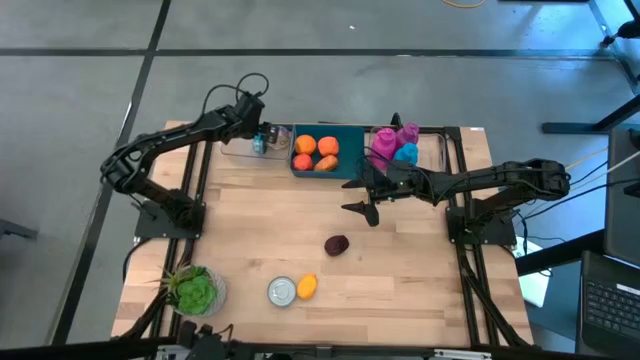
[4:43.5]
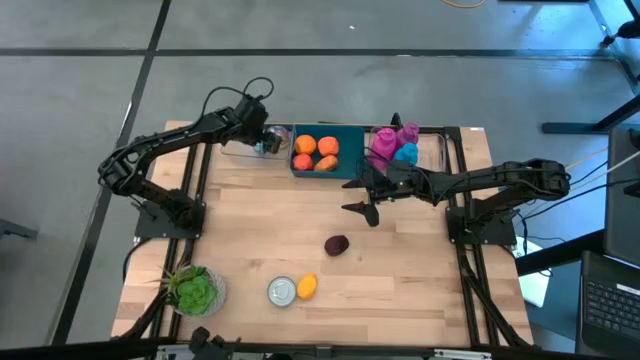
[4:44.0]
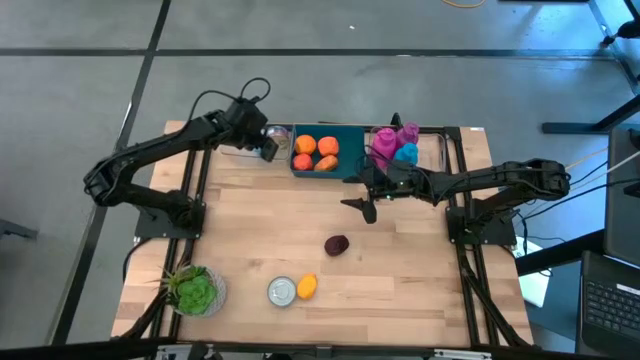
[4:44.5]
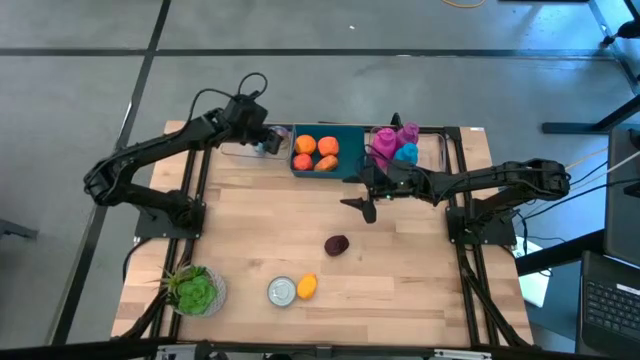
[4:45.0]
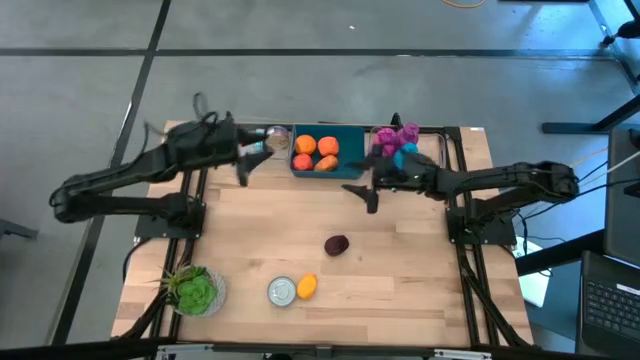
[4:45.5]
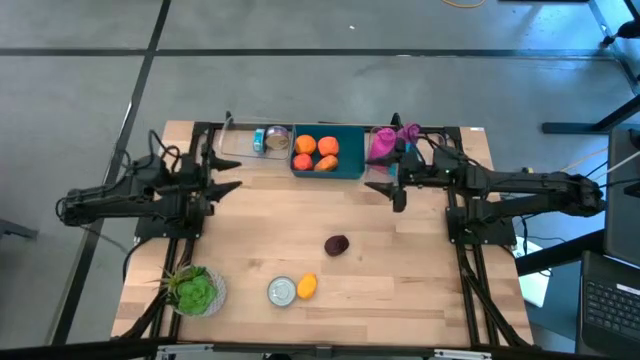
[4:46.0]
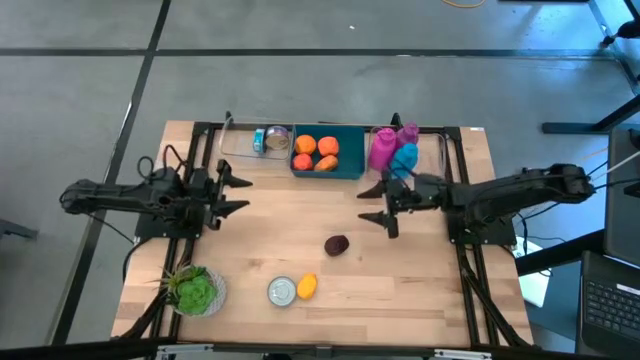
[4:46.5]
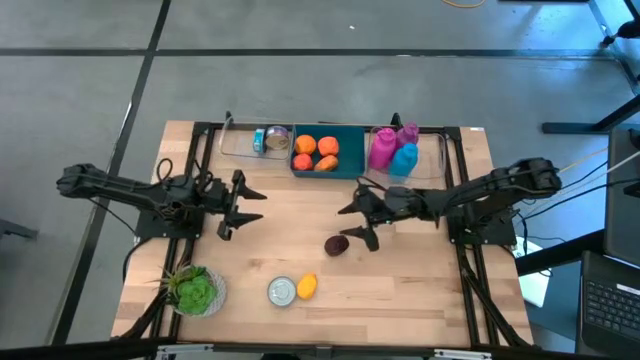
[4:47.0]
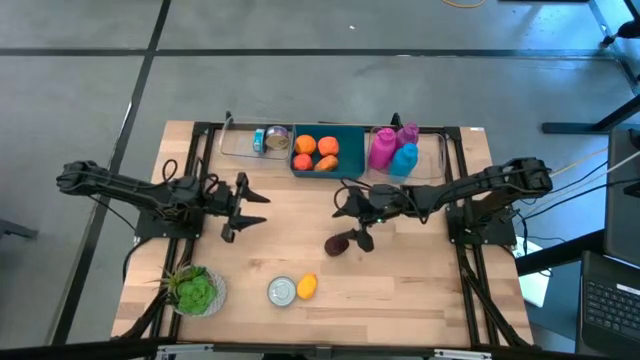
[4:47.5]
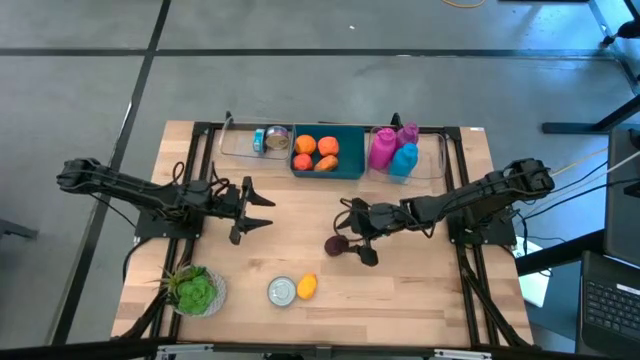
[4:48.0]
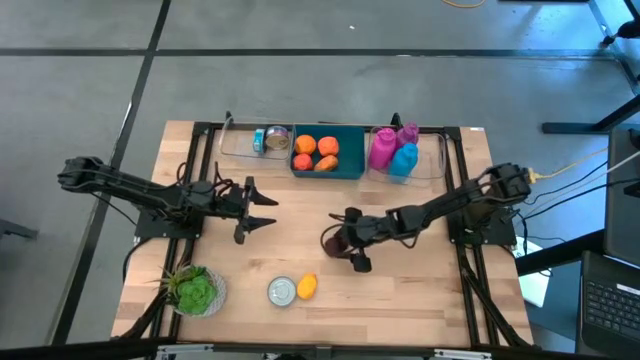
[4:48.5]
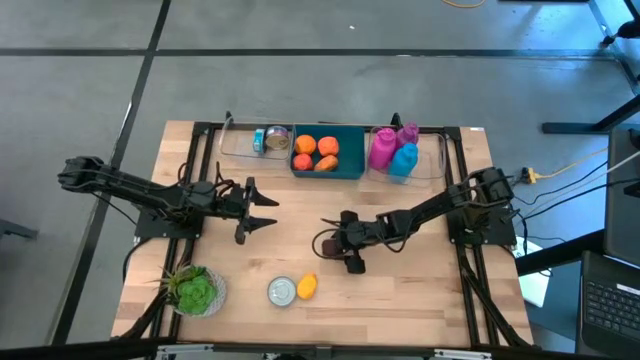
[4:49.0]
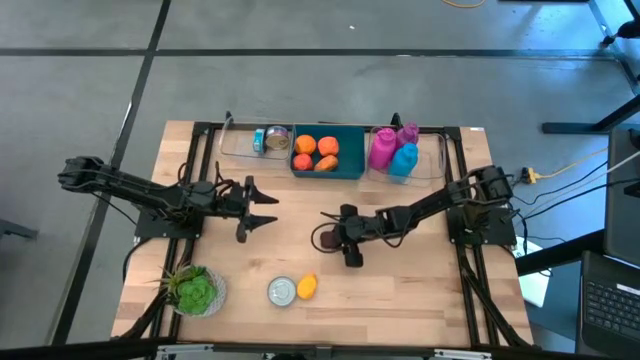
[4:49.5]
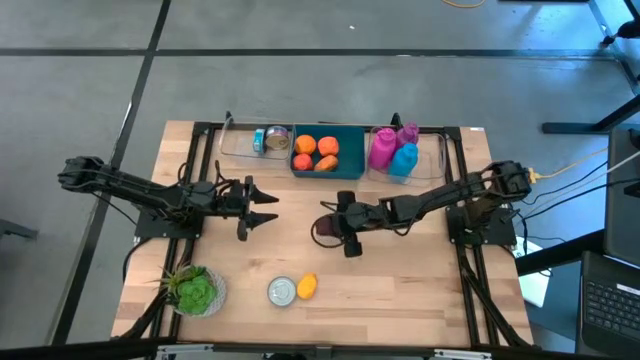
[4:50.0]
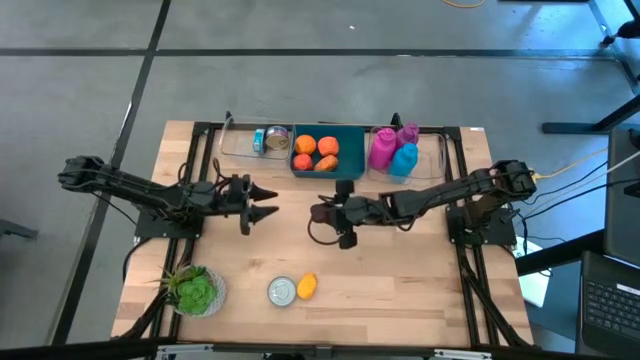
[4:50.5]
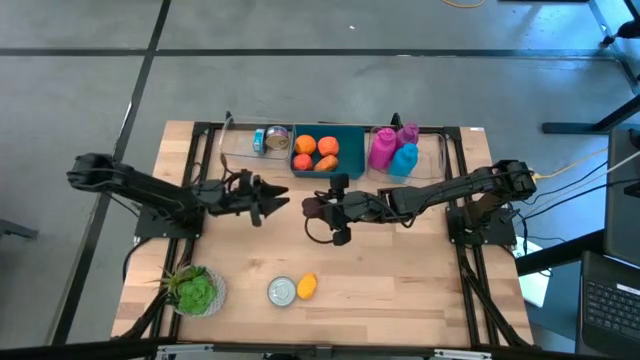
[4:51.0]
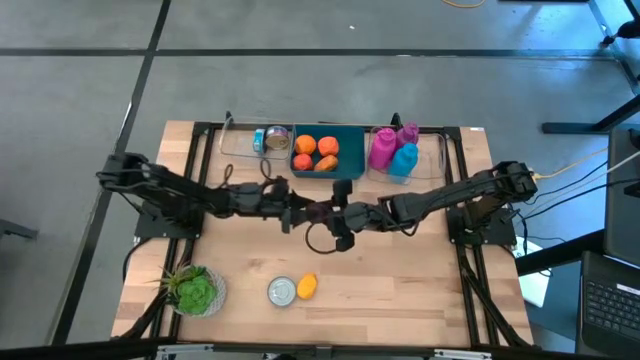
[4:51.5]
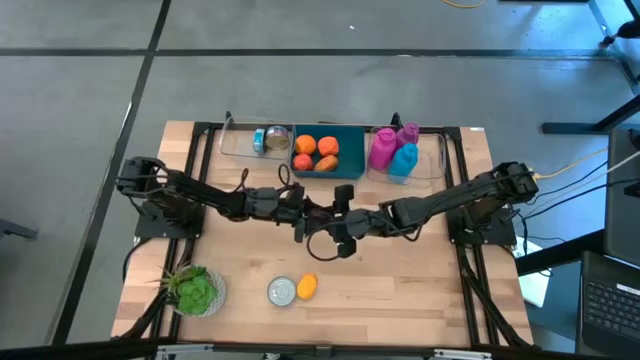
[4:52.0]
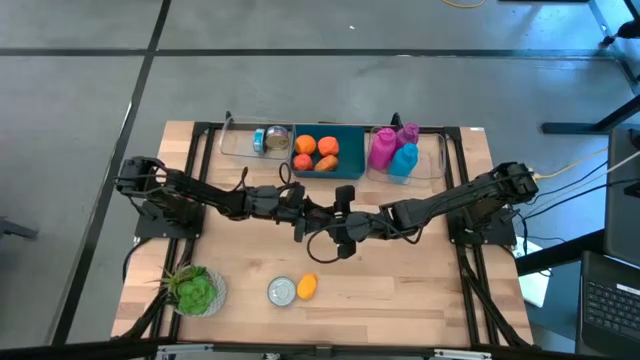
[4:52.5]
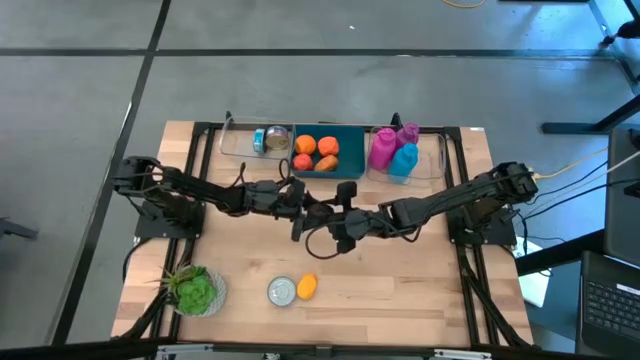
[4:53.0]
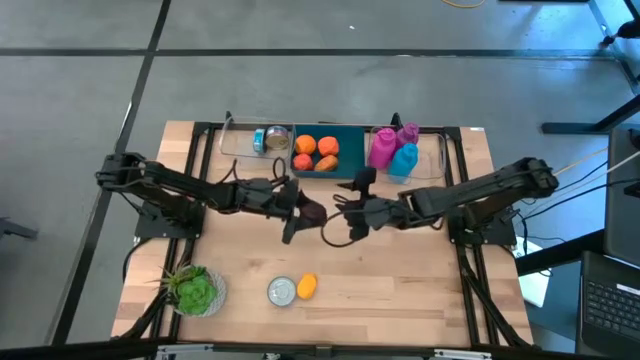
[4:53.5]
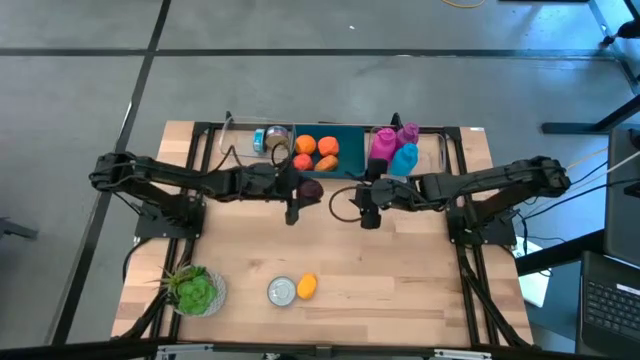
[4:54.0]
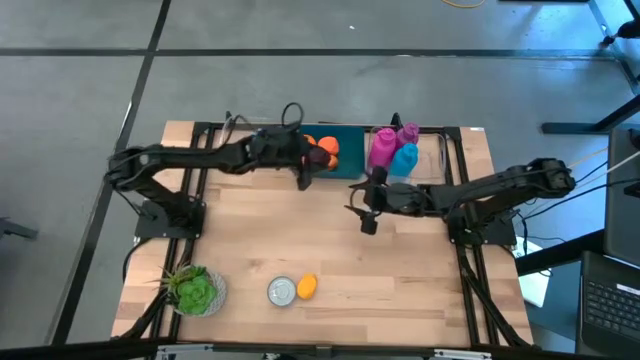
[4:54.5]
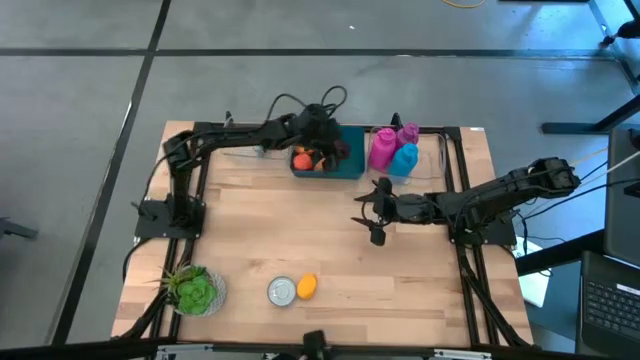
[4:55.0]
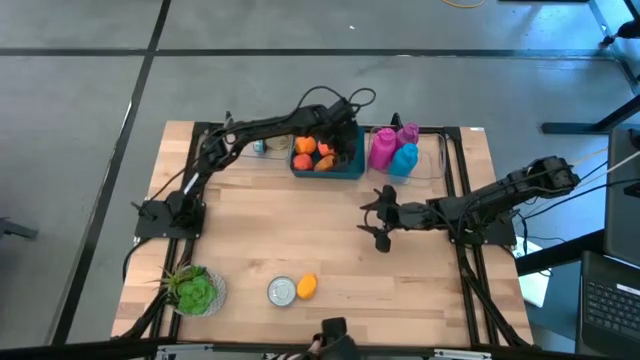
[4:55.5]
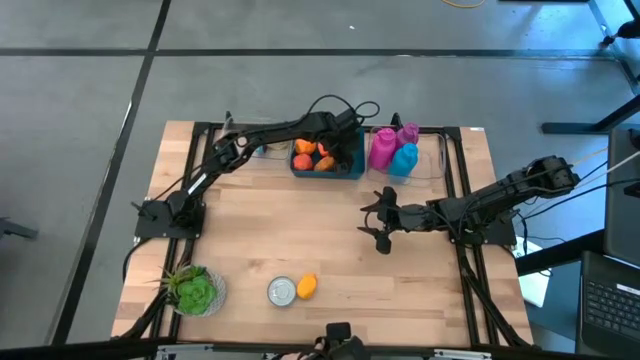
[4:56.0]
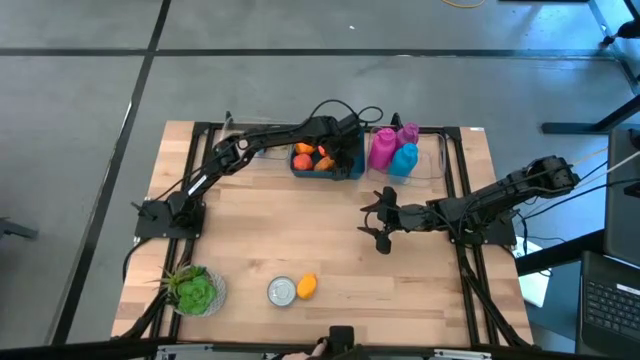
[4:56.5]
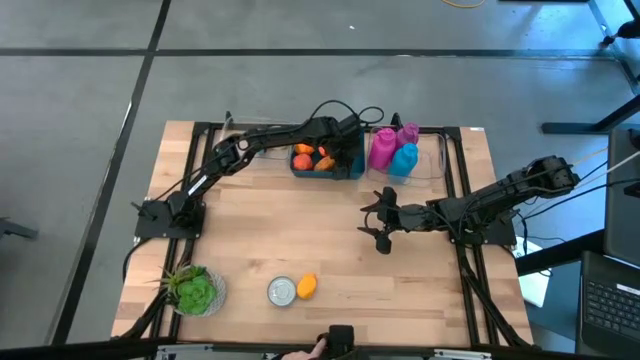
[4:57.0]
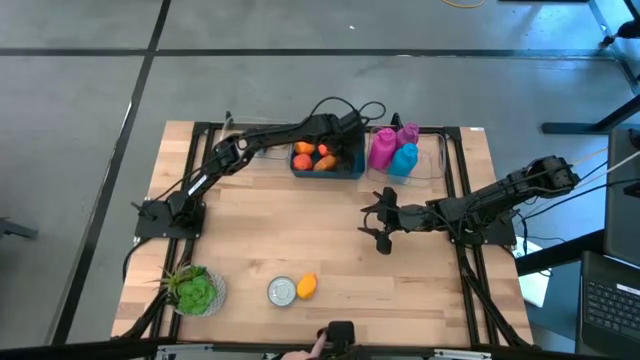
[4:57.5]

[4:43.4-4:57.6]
Task: Pick & Place Food Item
Put the apple into the blue bin

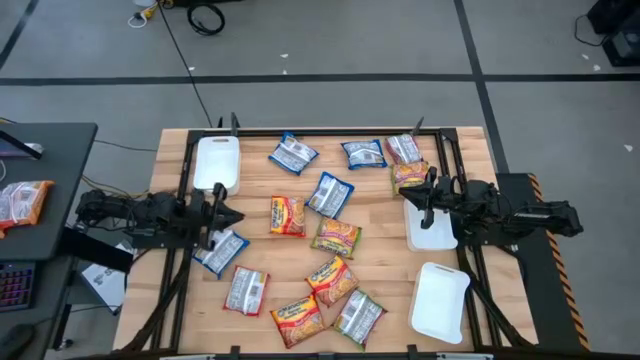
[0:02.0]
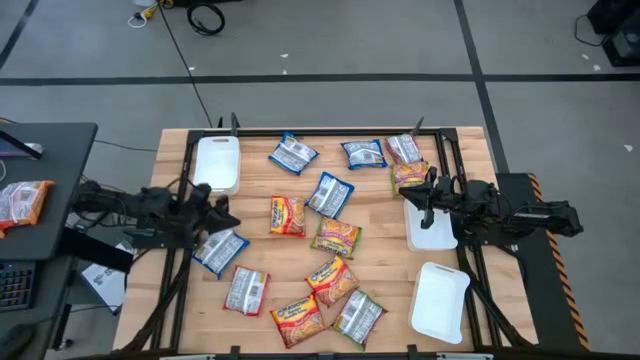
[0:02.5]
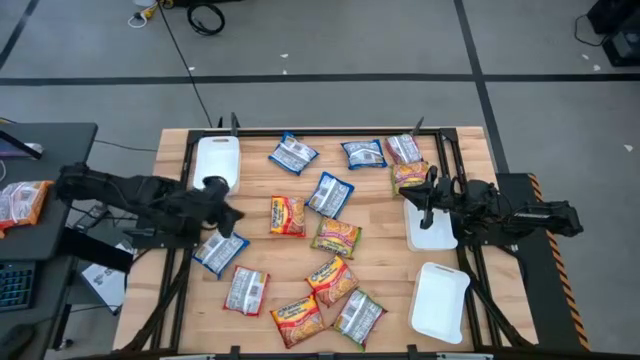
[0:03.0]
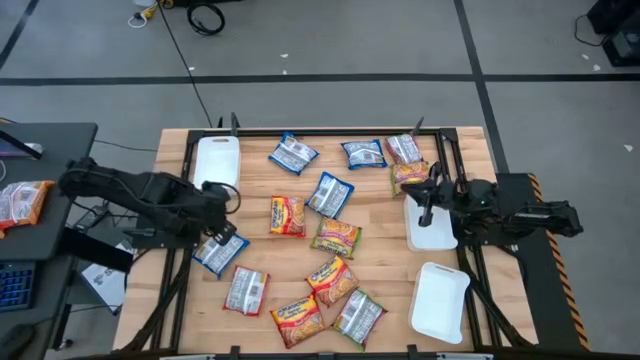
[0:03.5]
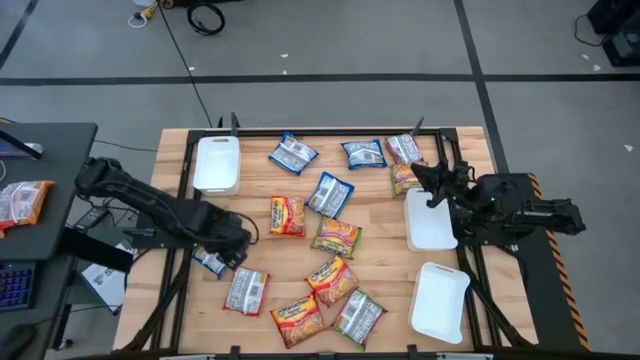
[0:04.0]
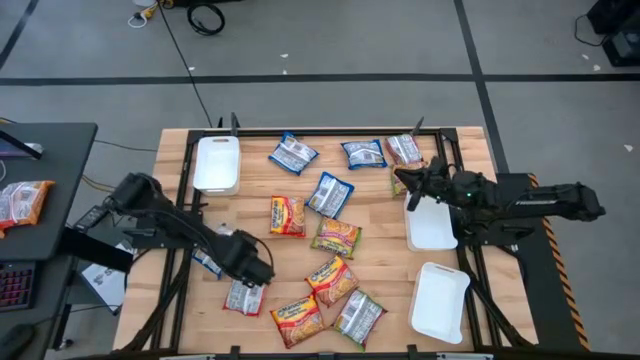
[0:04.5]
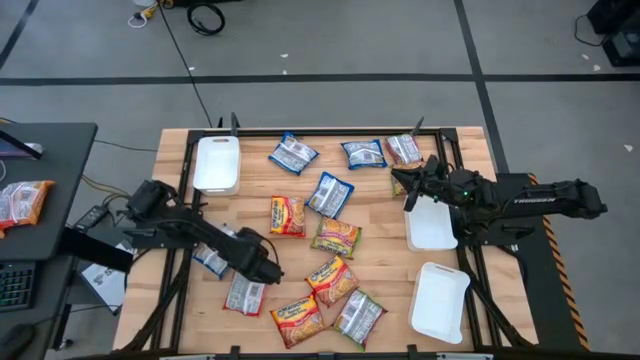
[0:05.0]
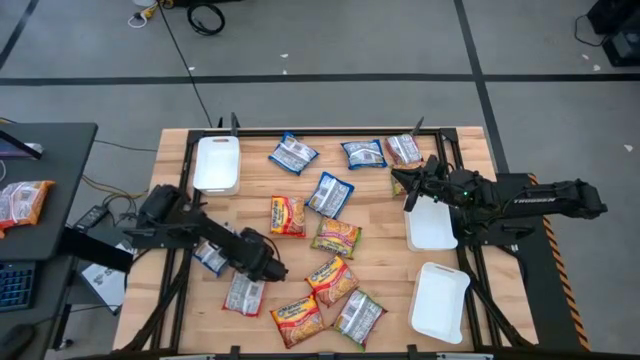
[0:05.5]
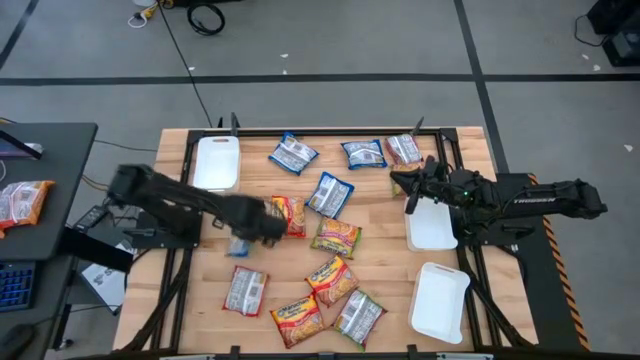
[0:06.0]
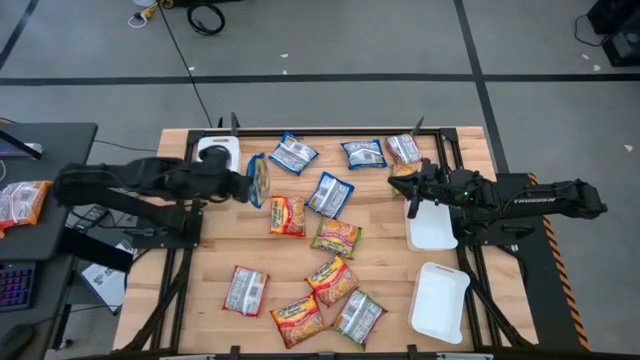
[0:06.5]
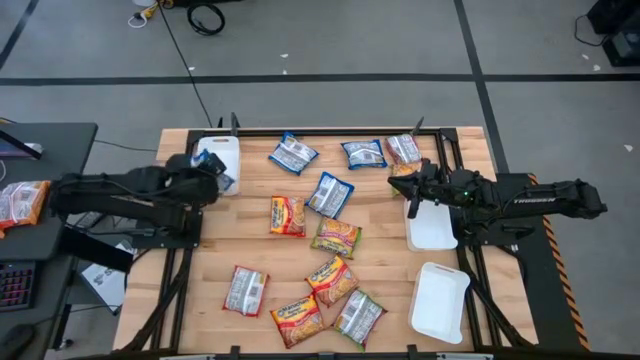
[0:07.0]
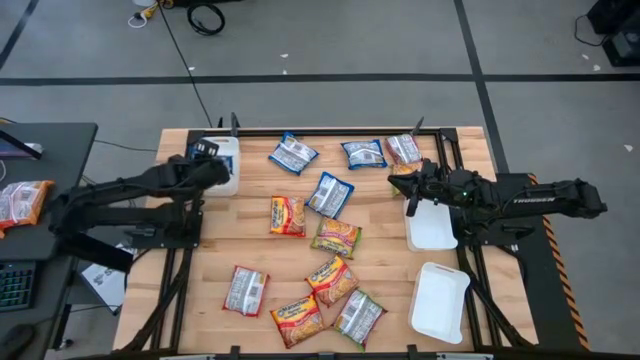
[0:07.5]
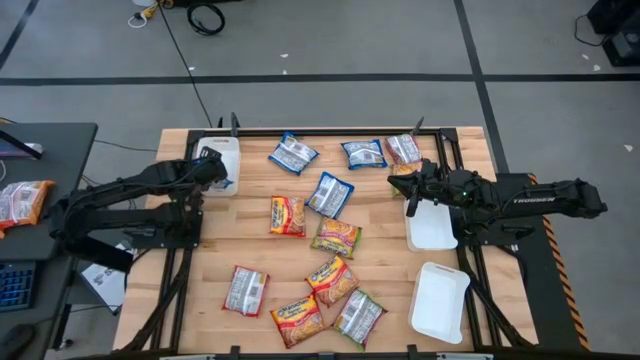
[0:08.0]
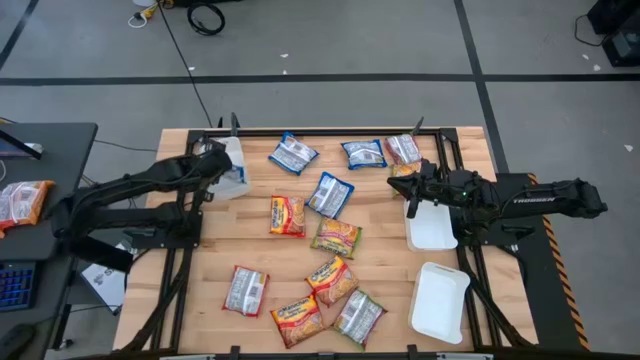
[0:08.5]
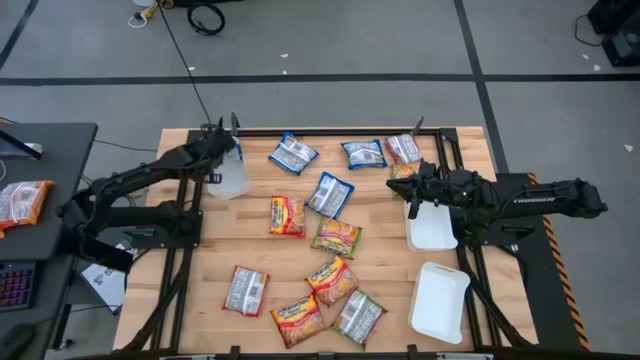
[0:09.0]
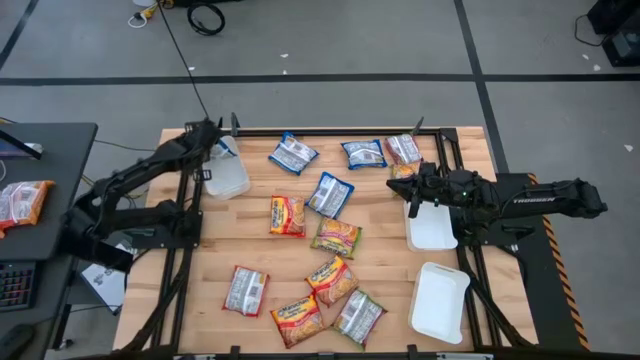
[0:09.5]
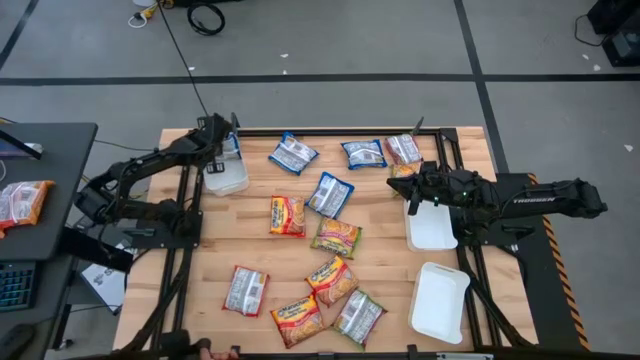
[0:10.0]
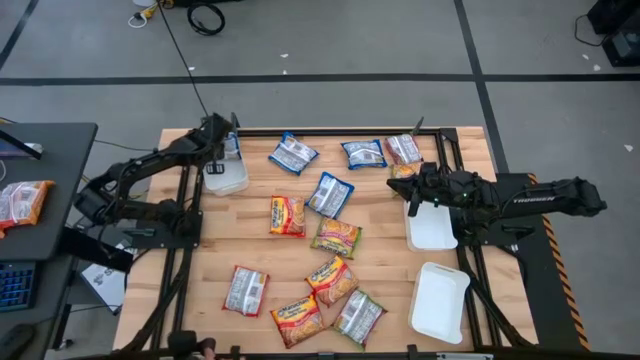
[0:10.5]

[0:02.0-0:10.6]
Task: Sort Maruchan noodles
Put the blue noodle pack into the top left white bin
